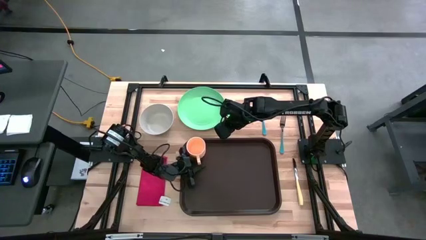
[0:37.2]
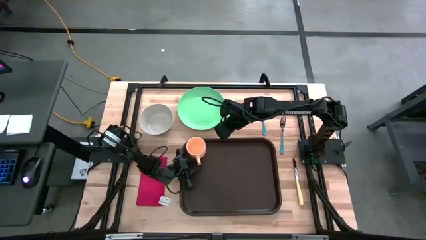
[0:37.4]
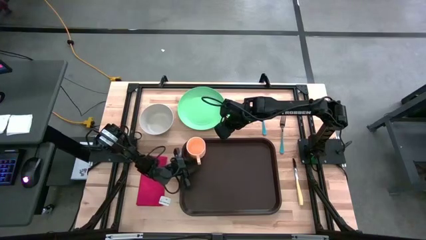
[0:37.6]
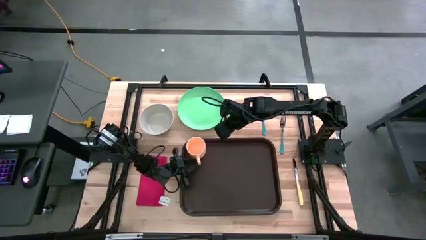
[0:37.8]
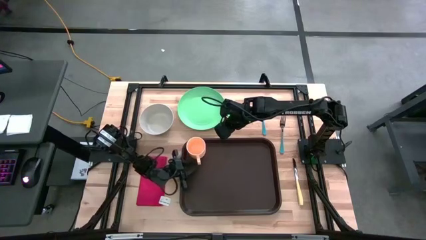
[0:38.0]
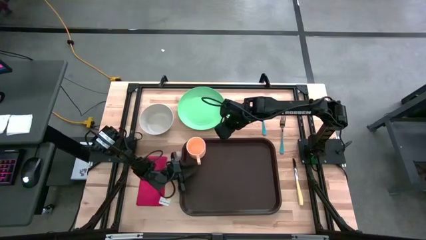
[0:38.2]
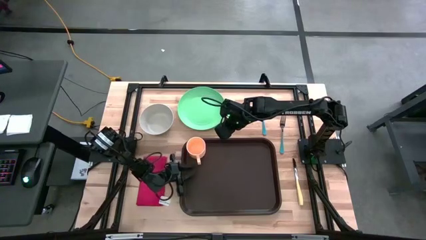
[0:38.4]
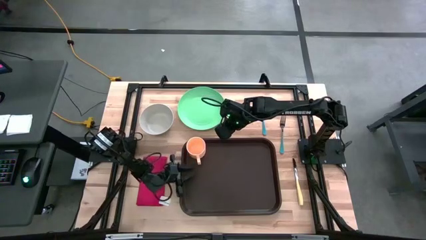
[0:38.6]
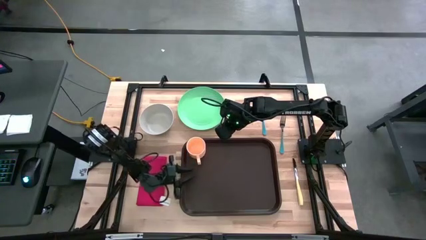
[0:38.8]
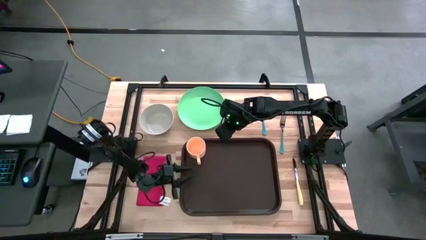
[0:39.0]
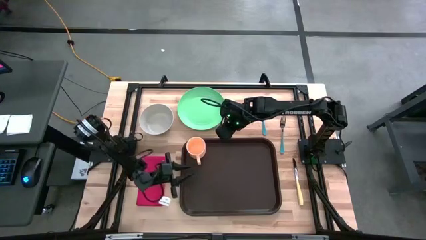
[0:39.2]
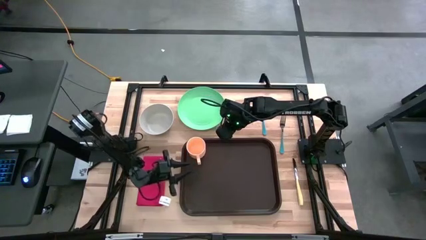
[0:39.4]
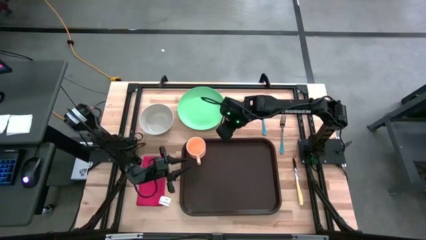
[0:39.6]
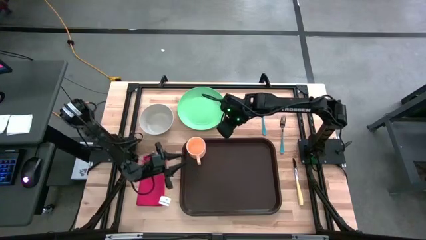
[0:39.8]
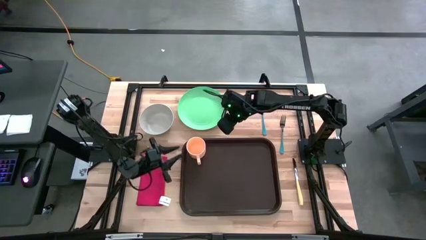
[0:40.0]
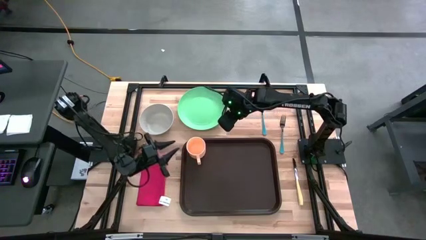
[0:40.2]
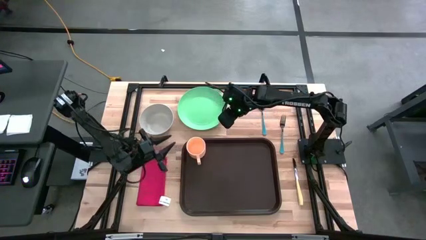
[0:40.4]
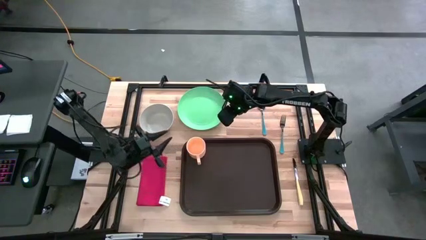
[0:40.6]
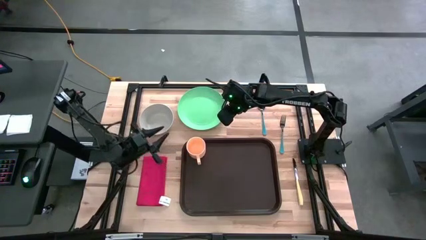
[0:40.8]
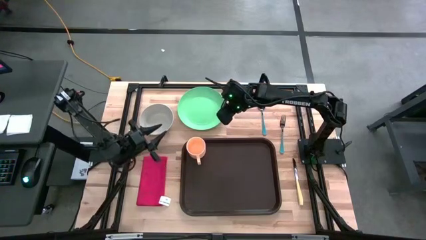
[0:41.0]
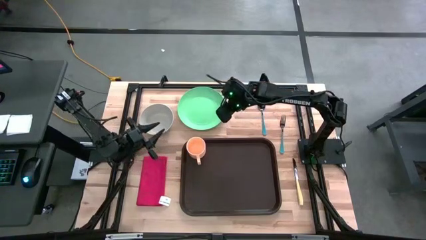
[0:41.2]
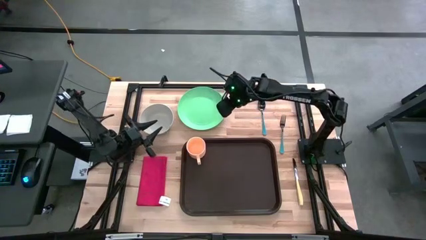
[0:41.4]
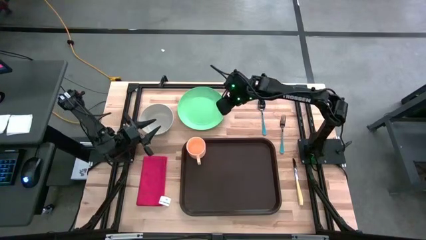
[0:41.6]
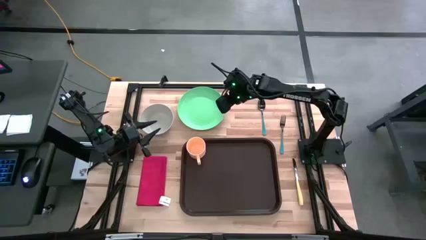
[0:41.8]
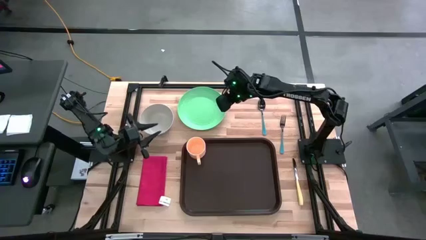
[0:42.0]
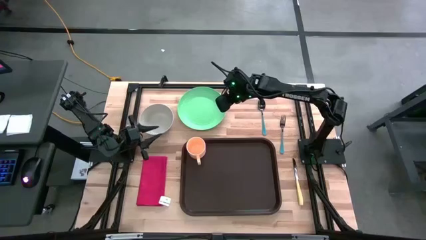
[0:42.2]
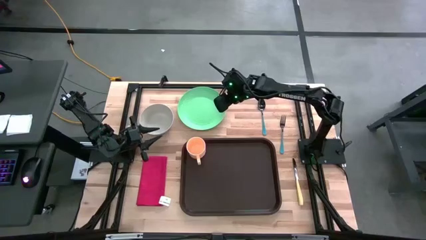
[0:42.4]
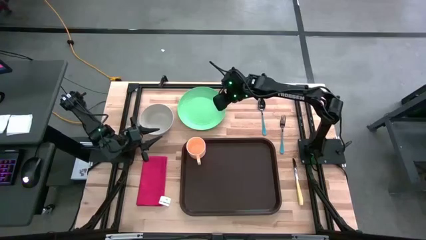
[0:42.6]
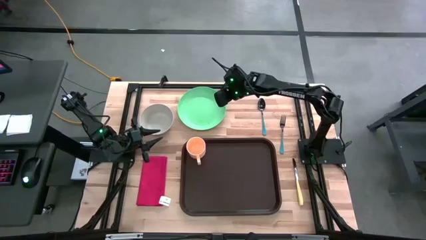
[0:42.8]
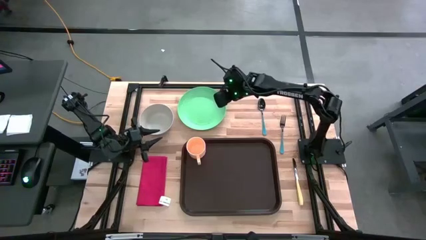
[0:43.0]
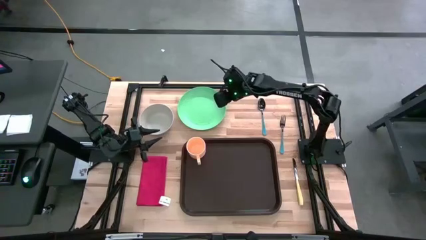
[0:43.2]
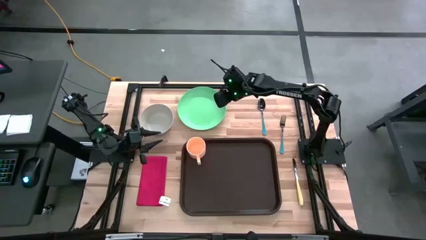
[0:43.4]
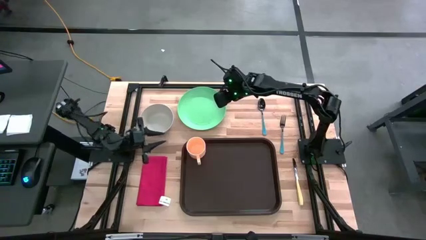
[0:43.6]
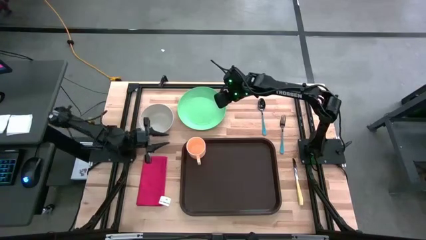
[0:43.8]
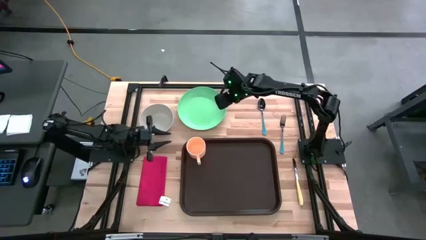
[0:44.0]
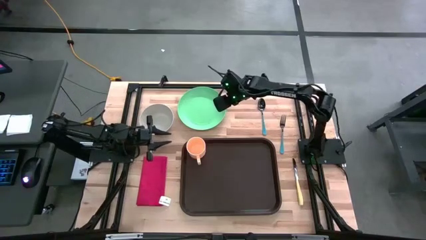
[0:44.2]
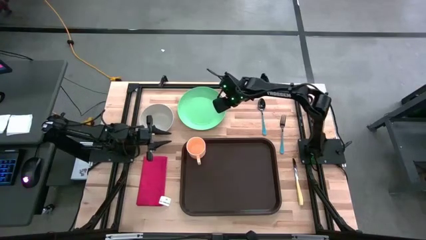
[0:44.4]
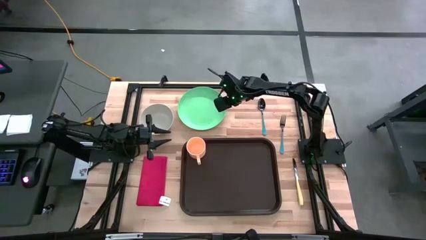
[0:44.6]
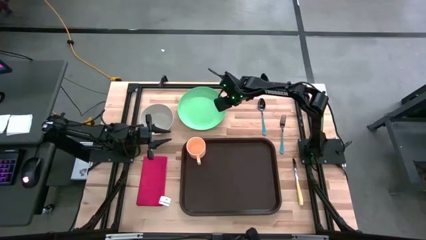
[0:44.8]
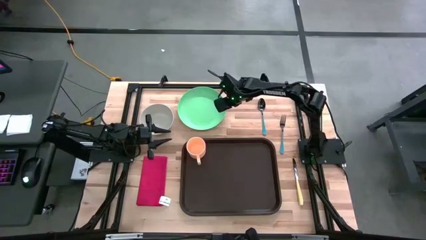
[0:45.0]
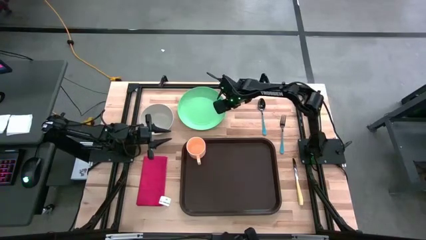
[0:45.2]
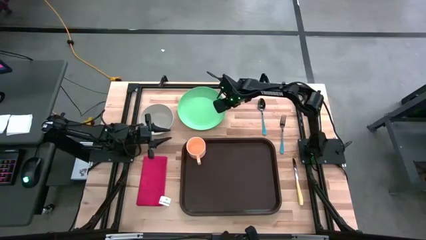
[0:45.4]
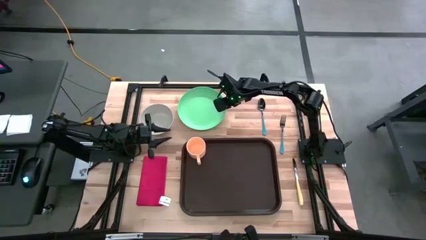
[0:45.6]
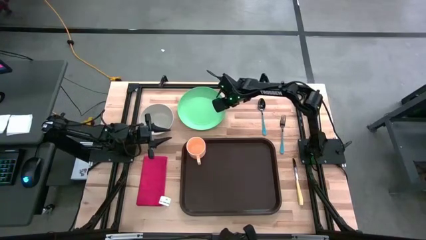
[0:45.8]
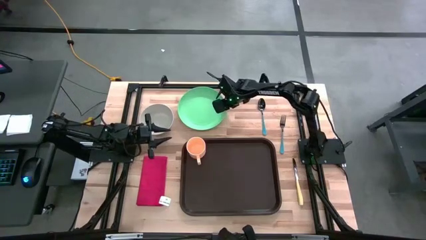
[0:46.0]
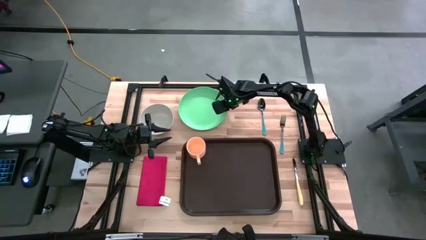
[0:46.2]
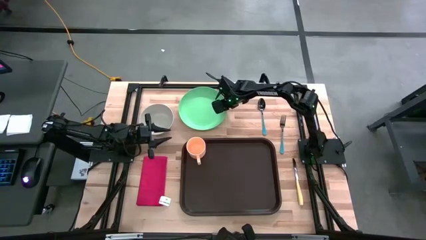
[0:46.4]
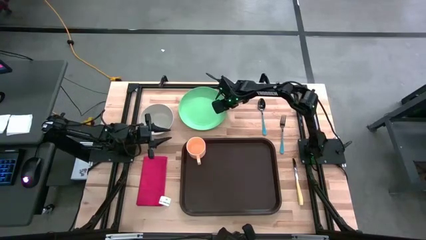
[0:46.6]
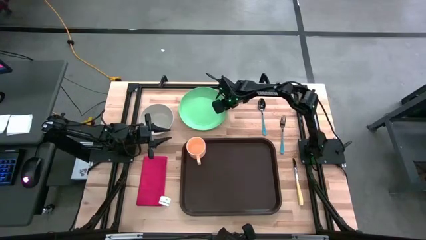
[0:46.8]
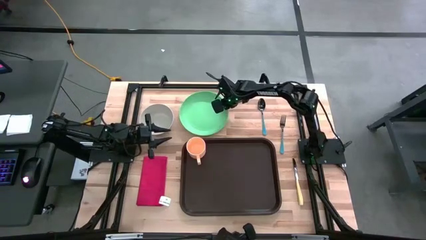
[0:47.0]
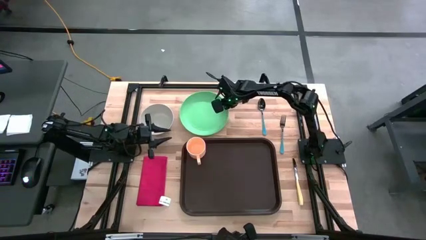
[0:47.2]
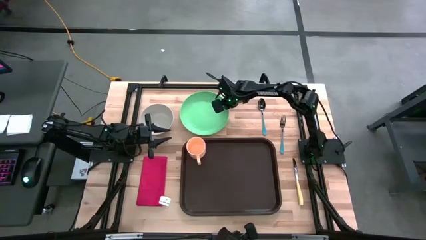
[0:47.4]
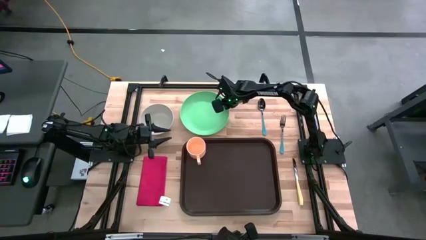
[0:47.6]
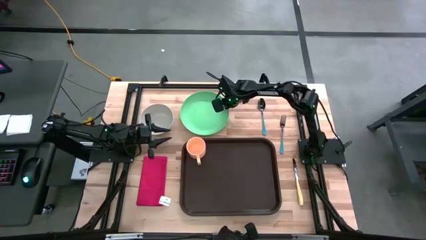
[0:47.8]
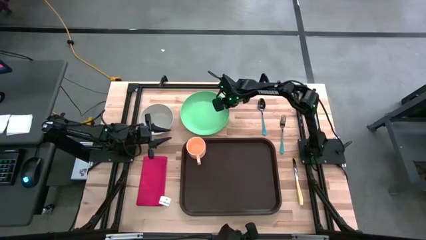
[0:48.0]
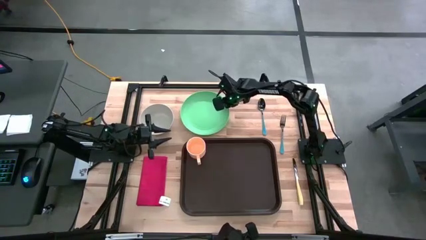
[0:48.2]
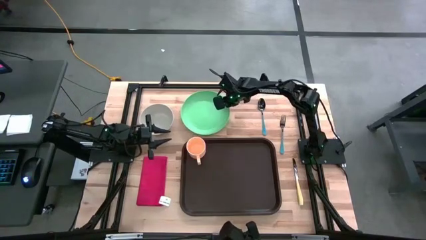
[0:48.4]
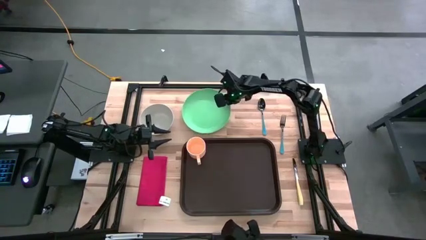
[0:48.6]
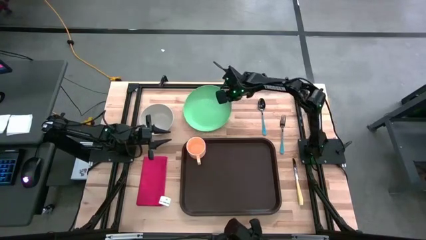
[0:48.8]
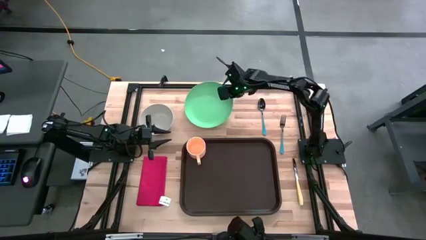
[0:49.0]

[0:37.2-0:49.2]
Task: Set up tray
Put the green plate on the black tray to the bottom right of the orange mug
